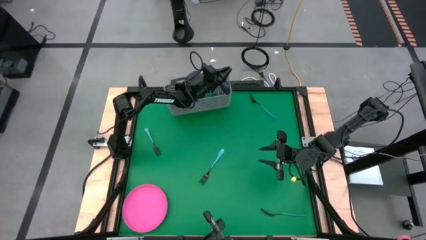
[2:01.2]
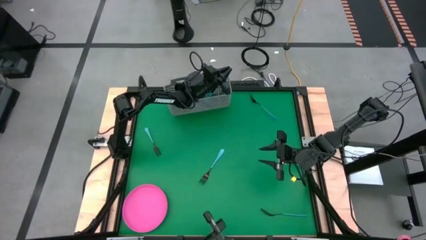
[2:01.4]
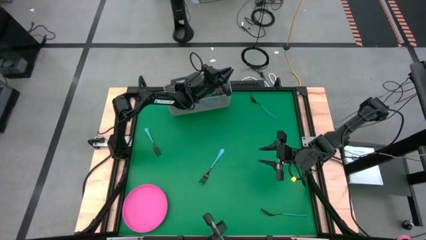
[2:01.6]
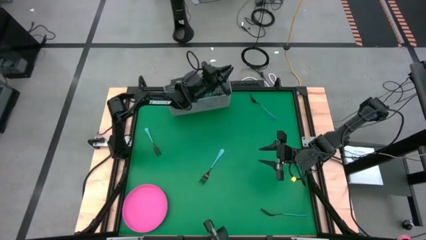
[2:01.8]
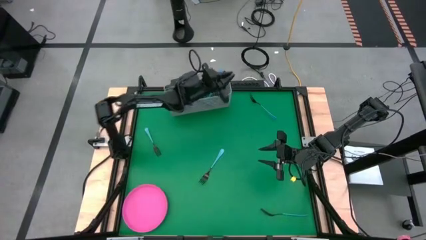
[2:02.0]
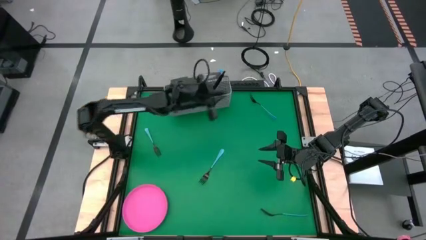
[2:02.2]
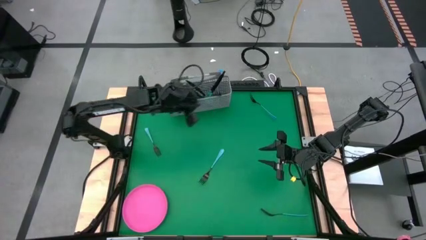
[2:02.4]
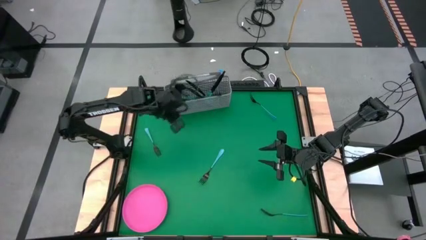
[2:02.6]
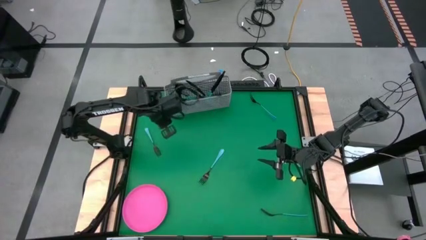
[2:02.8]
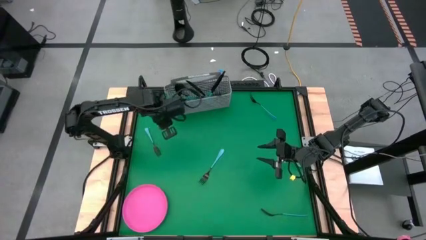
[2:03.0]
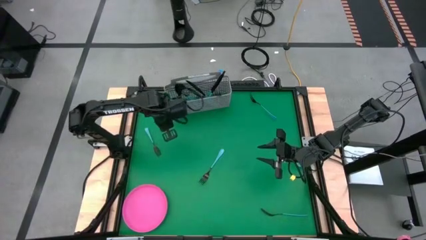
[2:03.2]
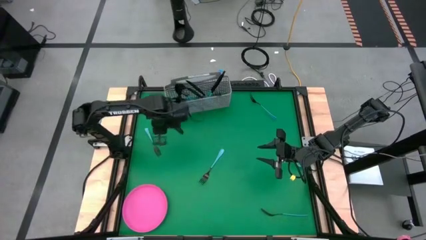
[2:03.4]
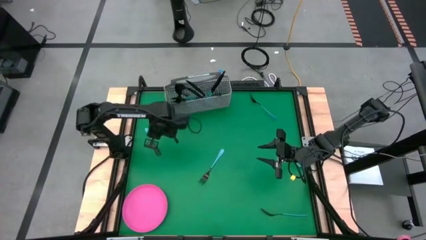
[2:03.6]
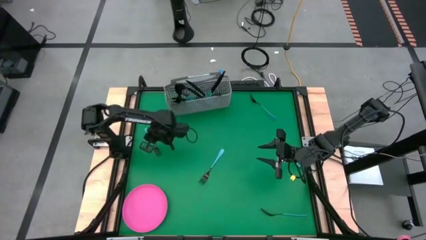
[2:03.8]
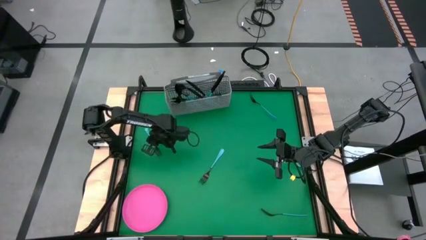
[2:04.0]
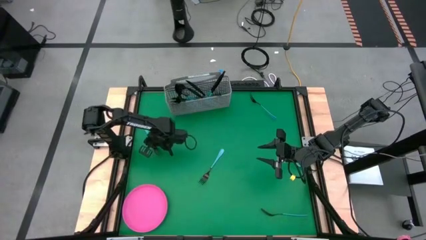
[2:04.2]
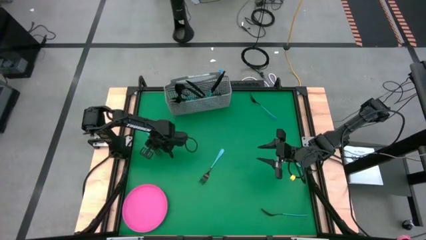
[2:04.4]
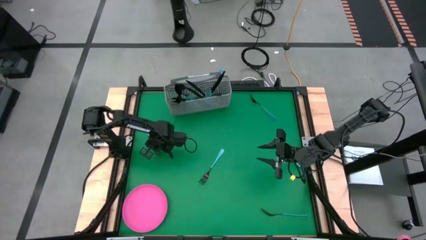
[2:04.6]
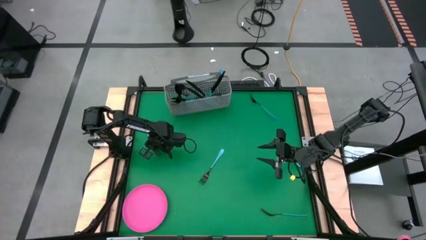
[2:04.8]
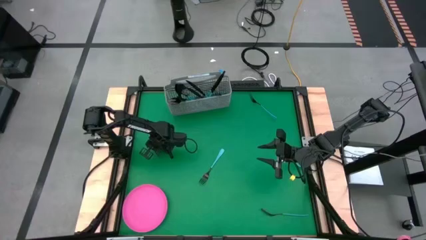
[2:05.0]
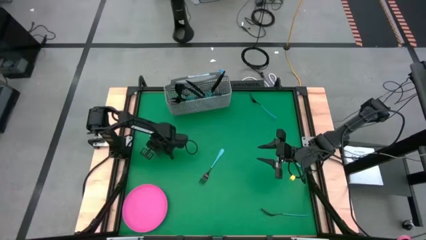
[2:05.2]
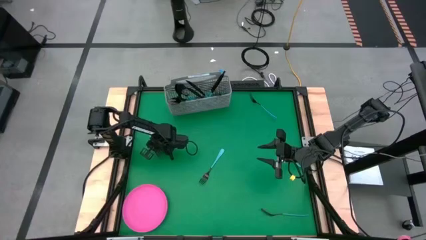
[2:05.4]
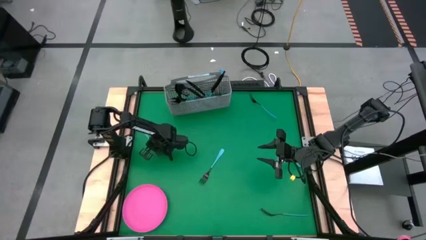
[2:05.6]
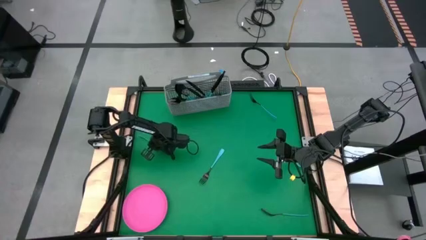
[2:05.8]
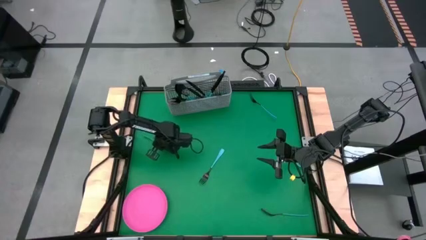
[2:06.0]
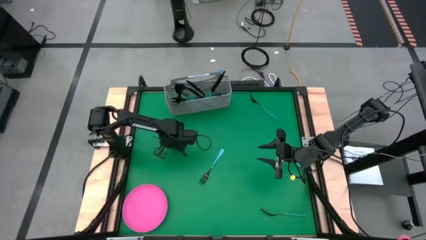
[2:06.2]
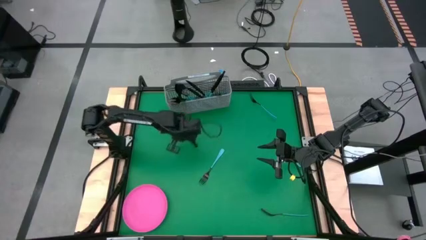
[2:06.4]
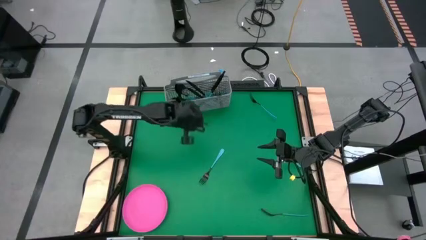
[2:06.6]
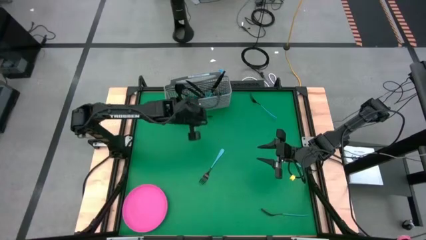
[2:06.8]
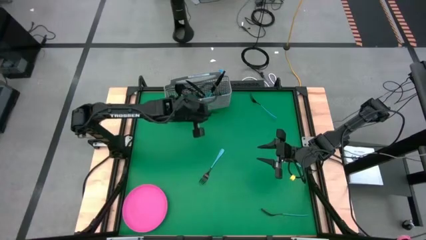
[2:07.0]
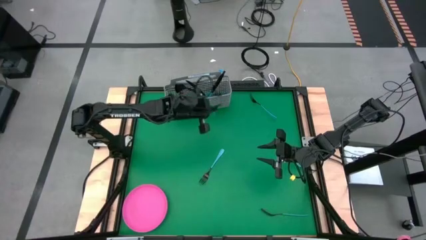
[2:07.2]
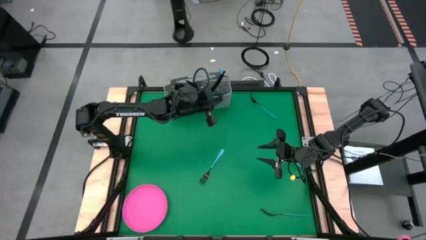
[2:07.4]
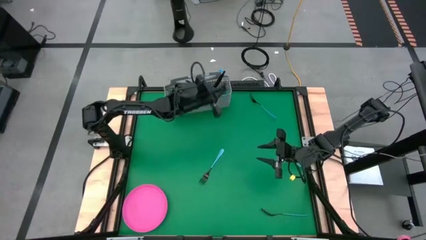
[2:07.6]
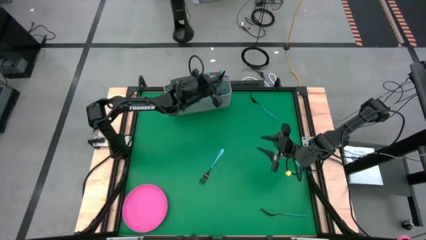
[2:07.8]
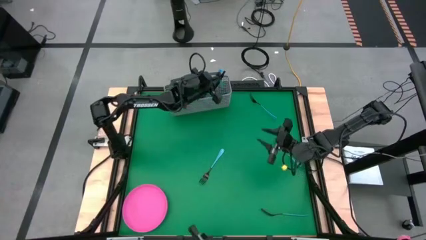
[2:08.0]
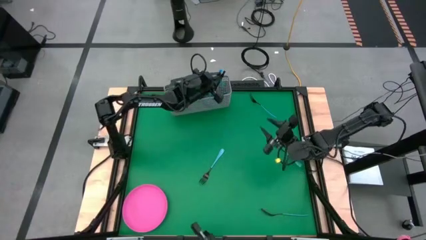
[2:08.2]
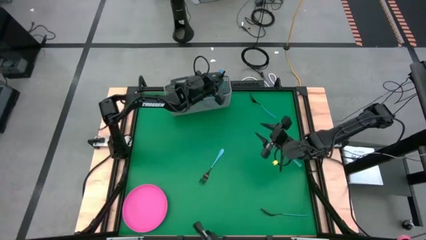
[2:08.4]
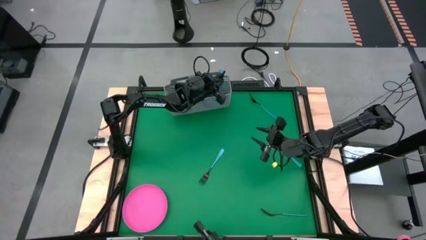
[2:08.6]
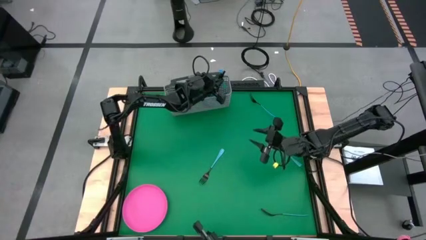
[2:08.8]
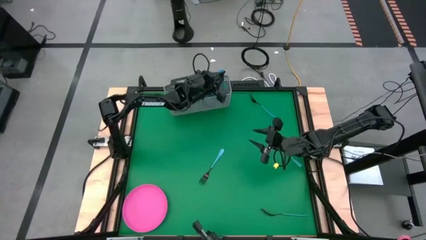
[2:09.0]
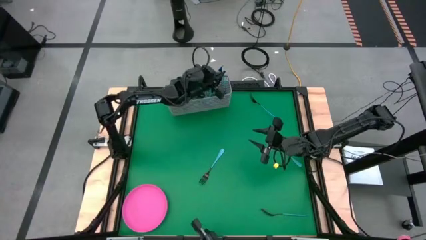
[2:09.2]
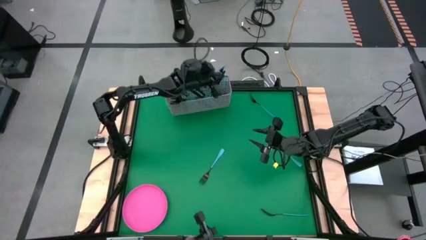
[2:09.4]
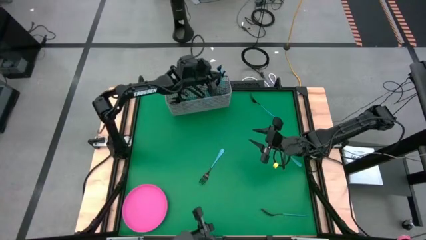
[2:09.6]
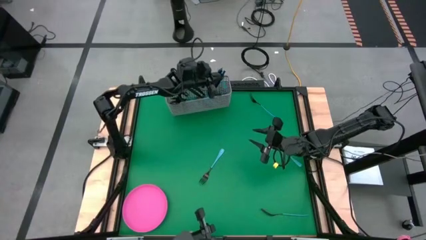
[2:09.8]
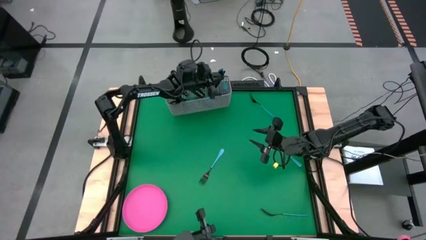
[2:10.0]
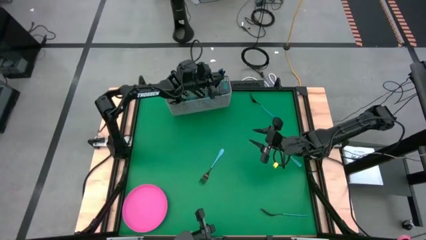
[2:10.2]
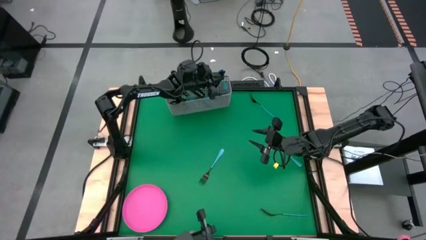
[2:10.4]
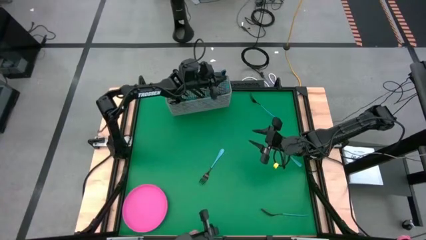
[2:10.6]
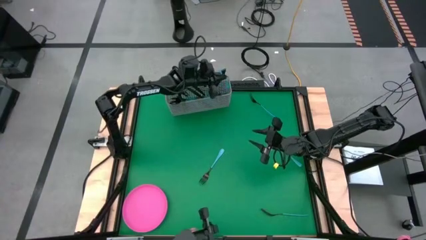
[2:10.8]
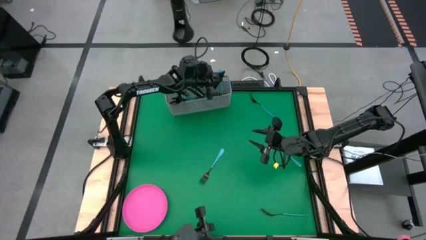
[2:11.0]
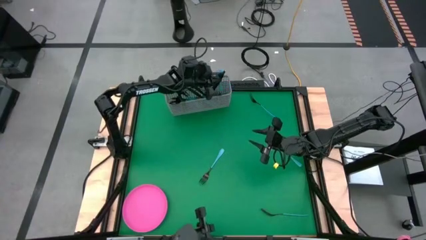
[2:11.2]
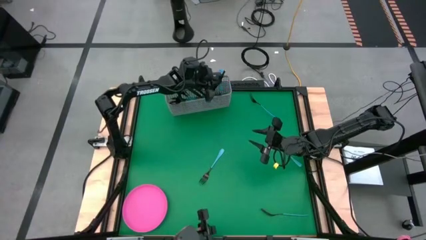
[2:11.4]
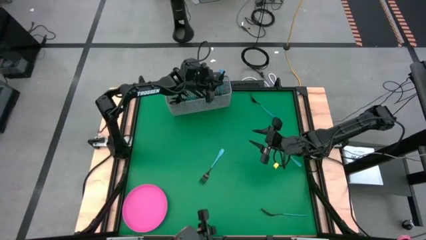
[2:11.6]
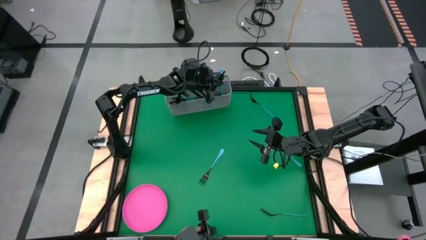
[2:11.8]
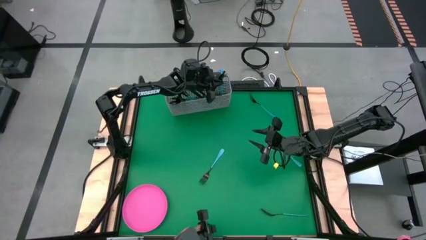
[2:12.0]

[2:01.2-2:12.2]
Task: Sort silverware
Put the blue fork into the silverware basket

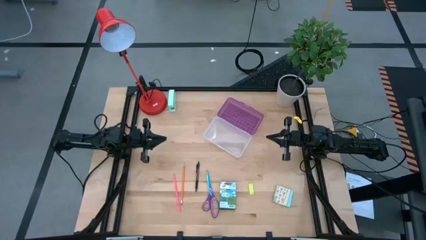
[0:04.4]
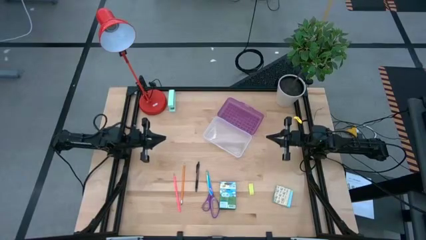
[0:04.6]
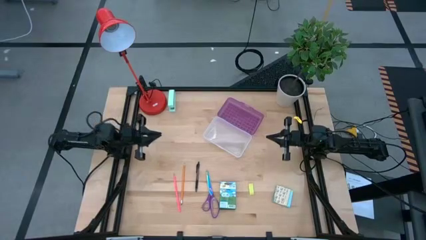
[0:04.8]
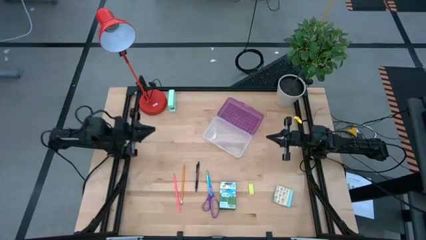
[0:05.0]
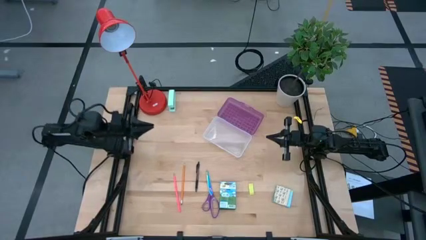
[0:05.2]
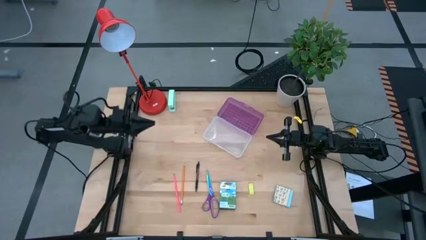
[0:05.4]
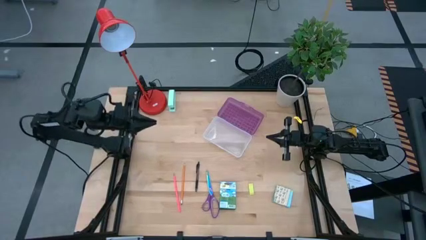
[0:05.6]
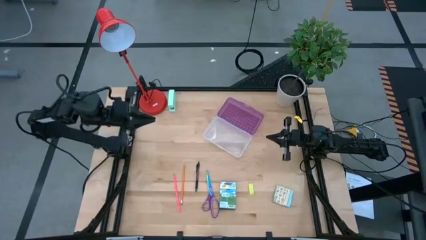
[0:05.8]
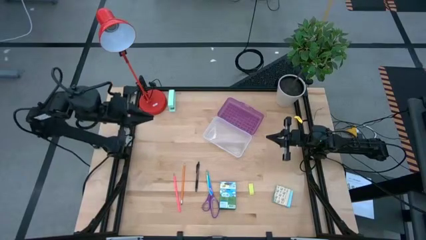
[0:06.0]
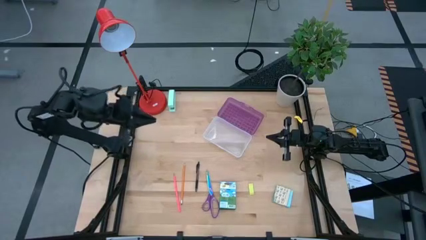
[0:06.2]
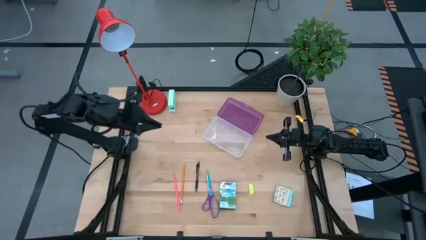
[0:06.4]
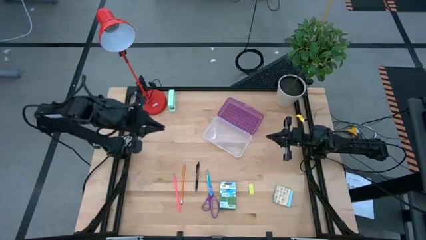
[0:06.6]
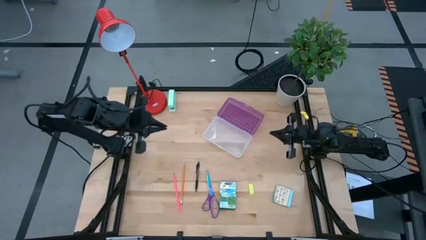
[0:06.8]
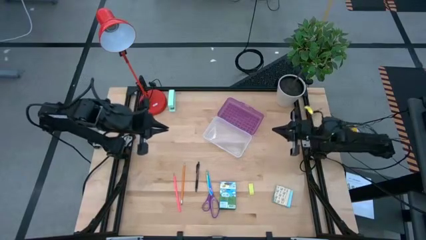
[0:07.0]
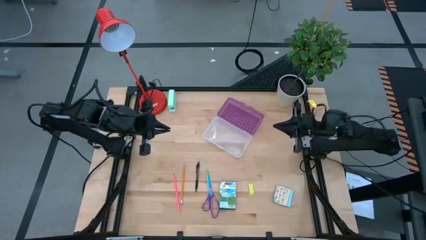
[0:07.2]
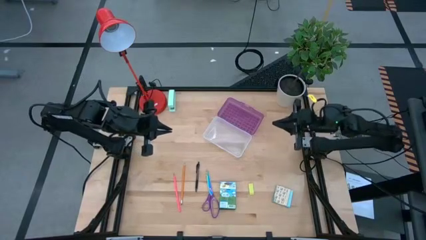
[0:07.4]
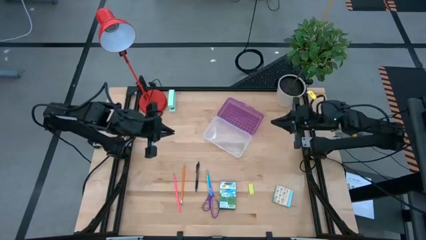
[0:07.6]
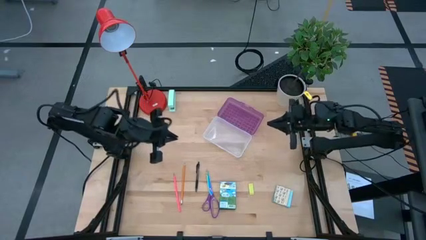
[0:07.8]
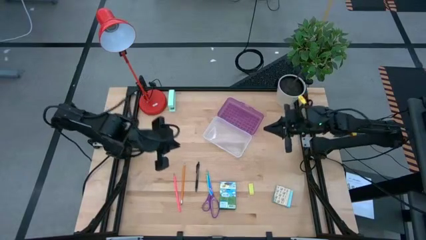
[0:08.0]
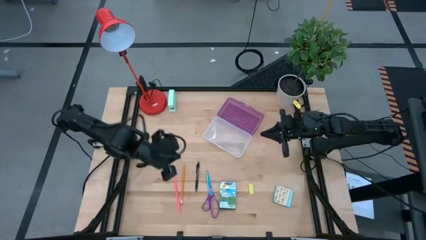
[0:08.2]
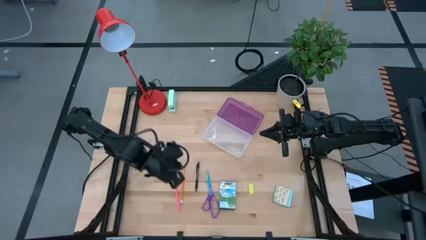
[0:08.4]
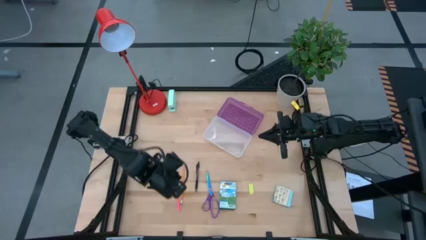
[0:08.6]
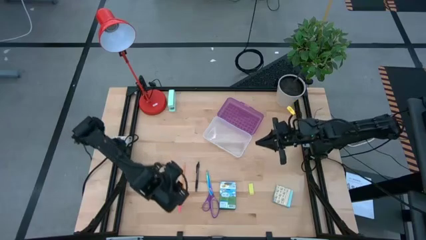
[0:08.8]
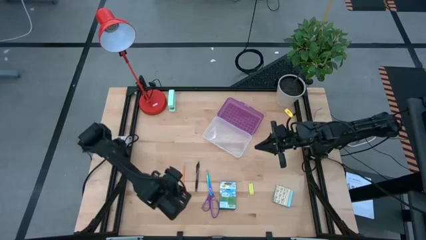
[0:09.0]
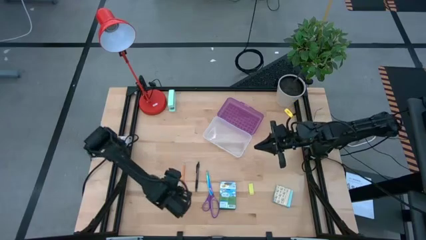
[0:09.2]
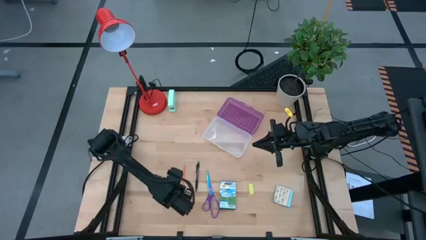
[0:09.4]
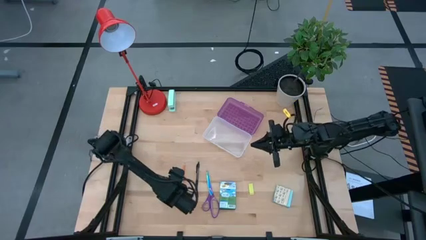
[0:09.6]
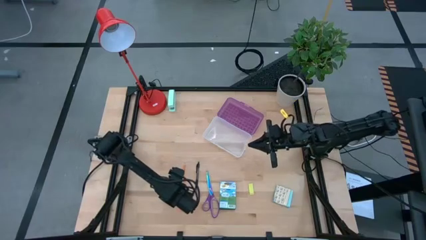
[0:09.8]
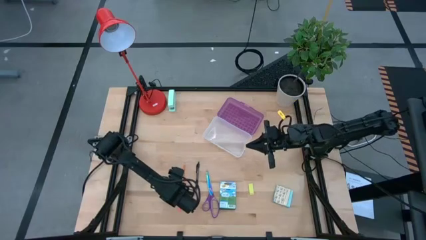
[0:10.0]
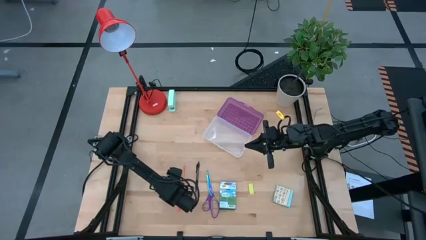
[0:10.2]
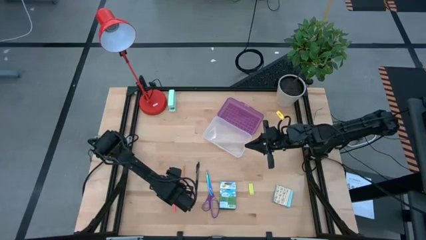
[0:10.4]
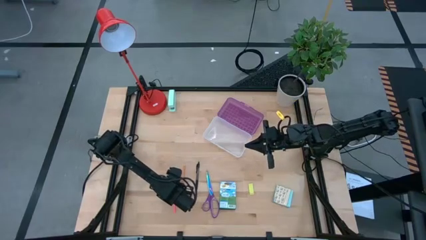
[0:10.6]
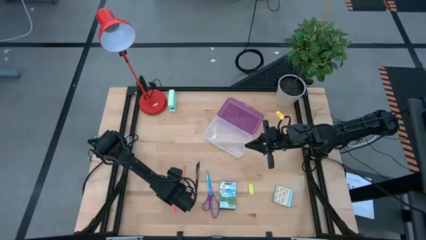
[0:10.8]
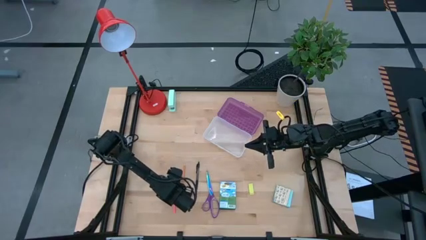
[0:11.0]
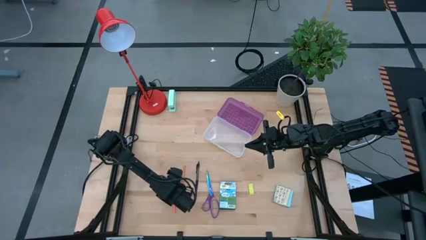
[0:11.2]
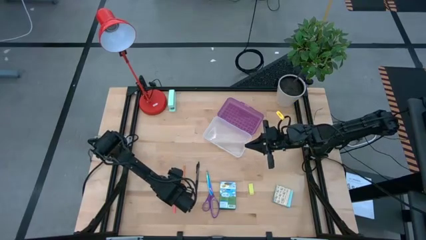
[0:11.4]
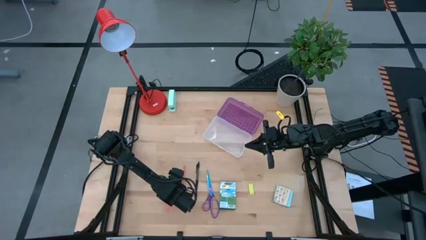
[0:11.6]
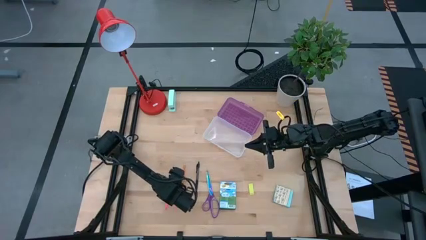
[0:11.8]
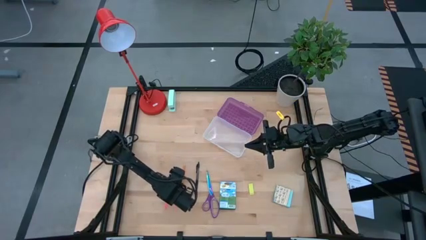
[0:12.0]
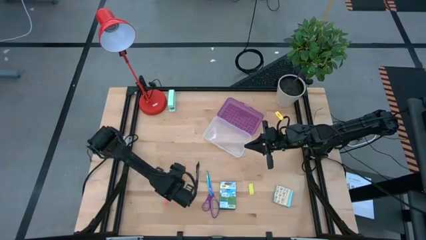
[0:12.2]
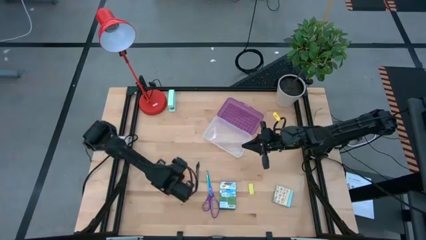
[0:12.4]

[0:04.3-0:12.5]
Task: Pack school essentials
Put the pink pencil into the purple supply box
